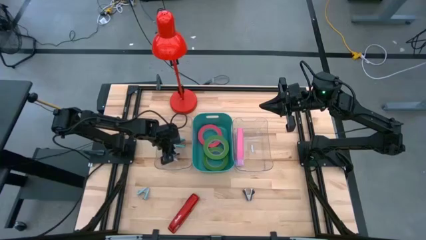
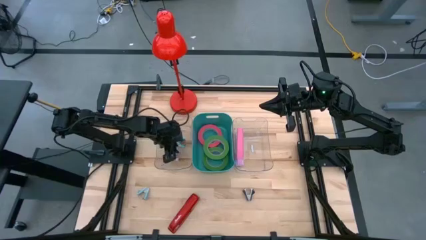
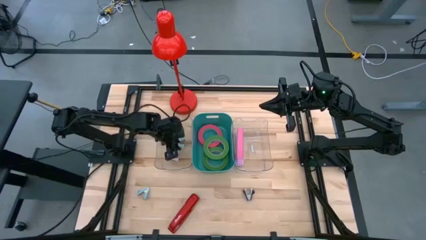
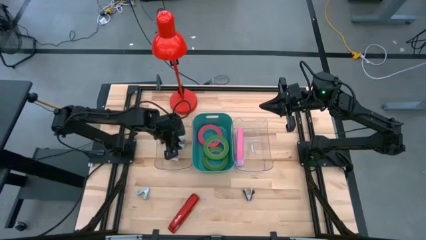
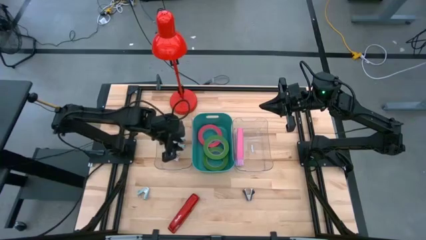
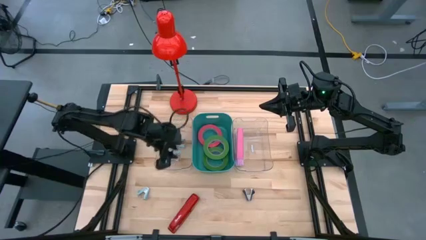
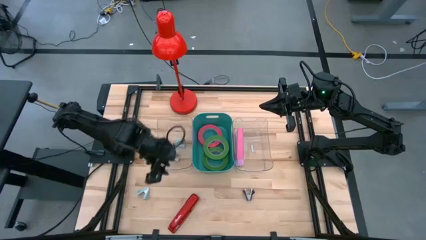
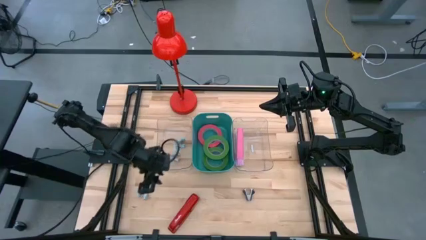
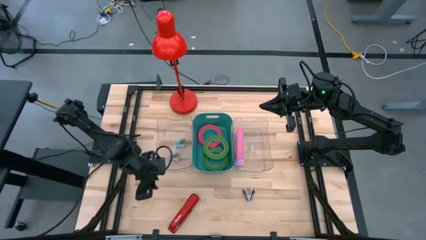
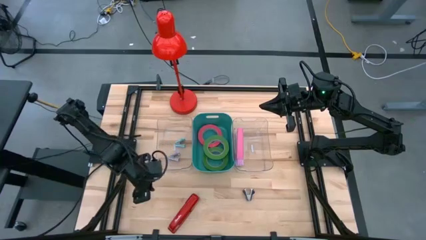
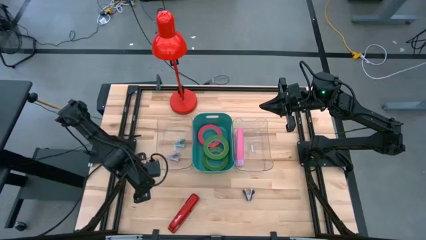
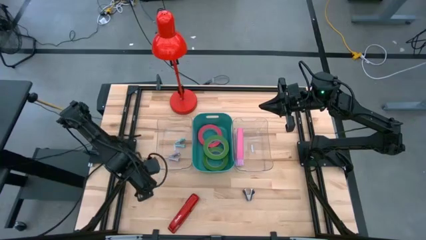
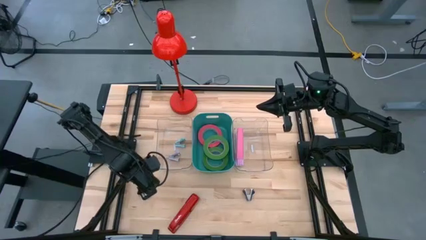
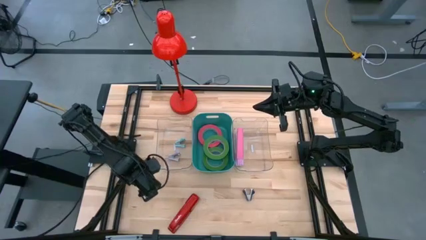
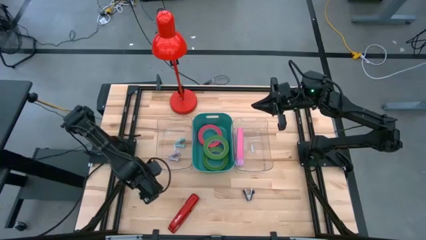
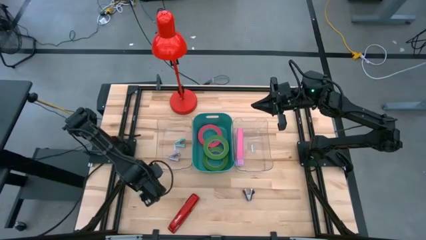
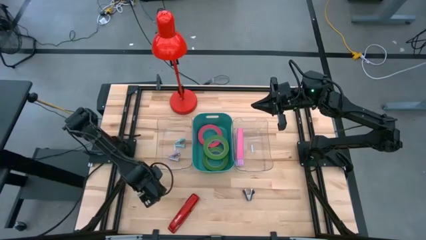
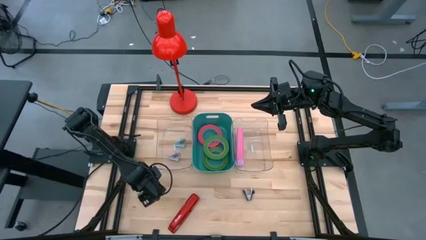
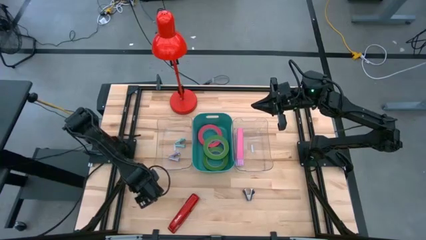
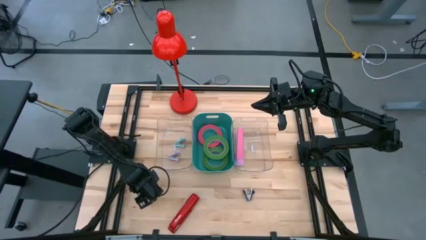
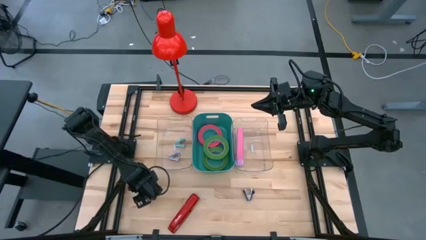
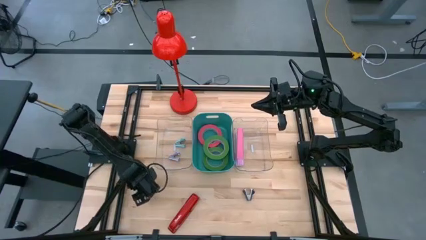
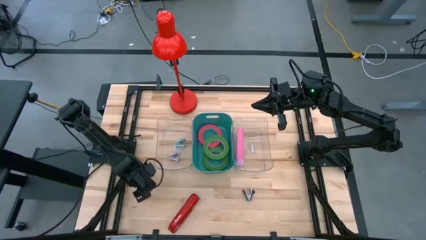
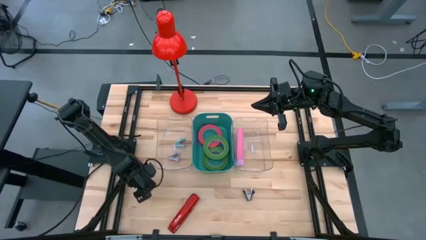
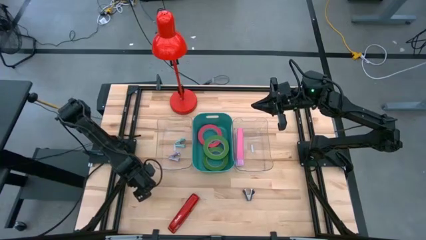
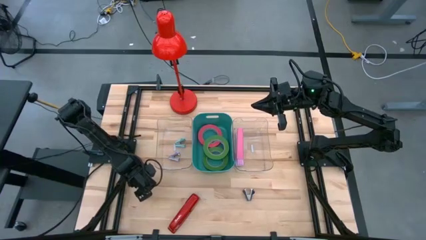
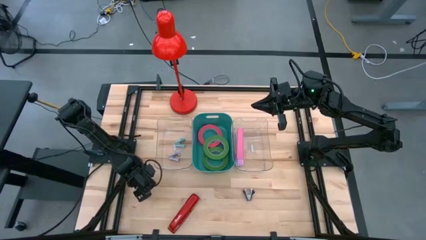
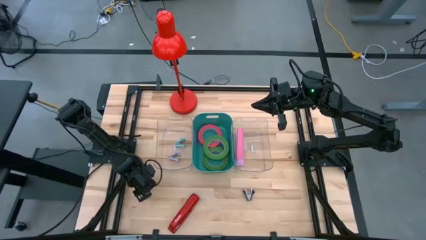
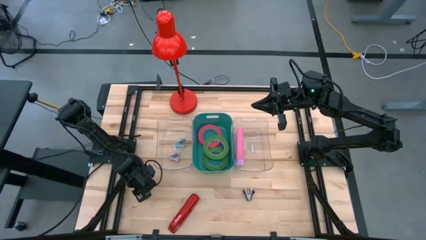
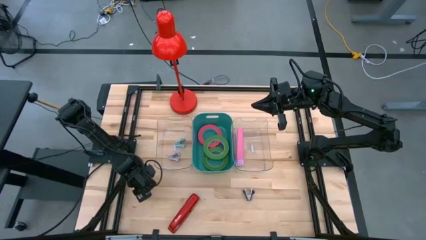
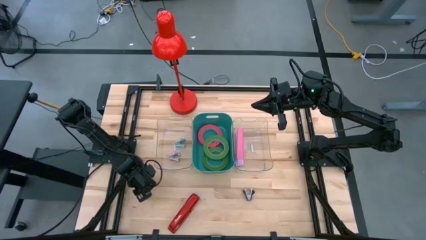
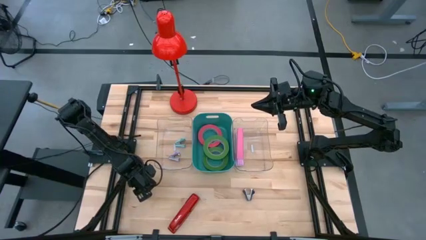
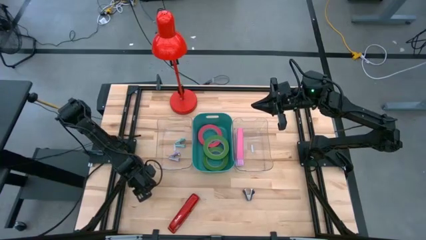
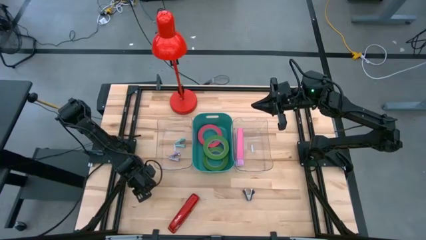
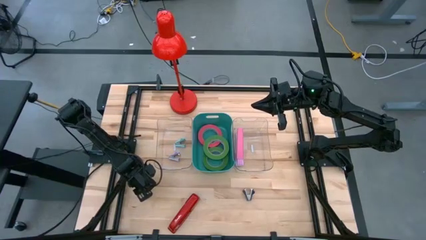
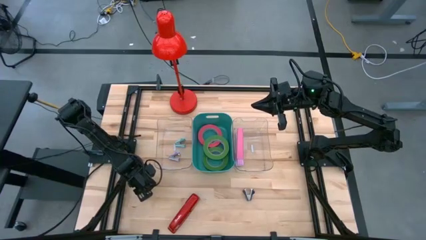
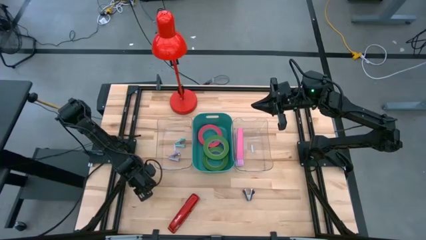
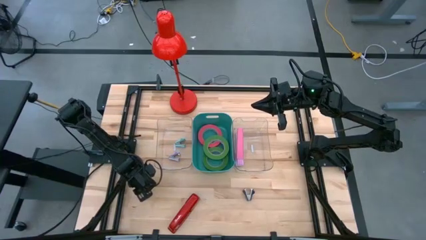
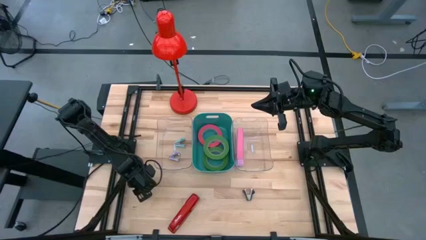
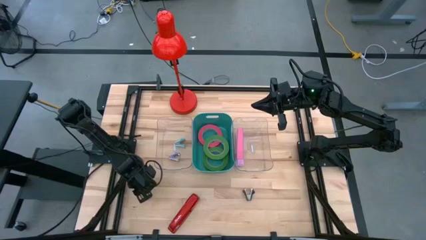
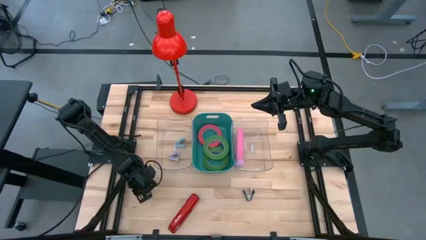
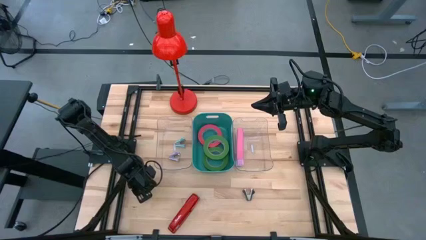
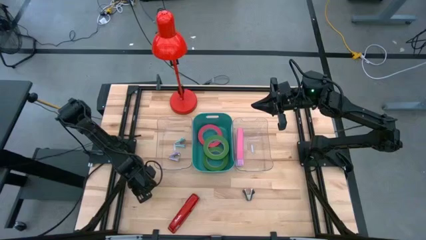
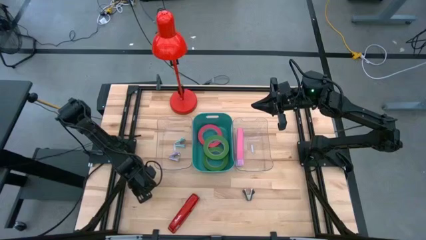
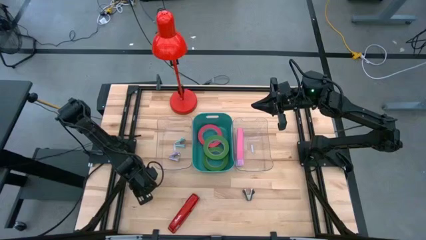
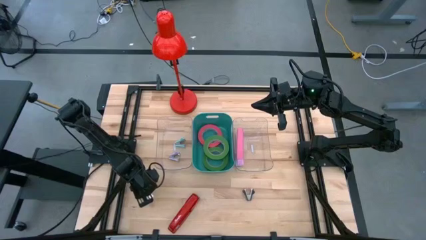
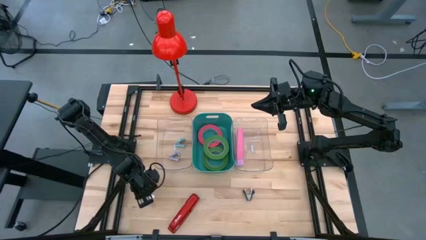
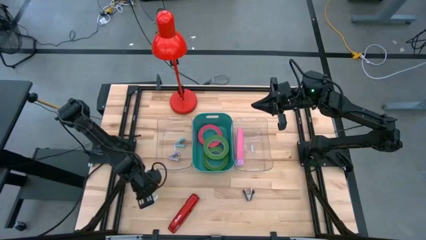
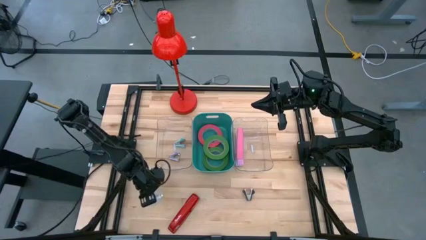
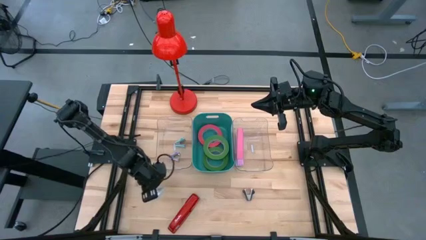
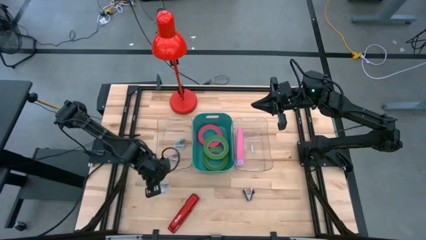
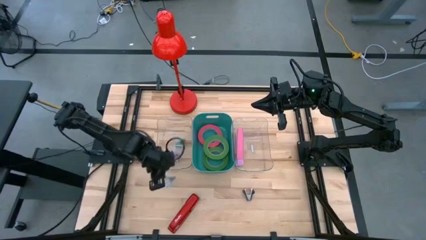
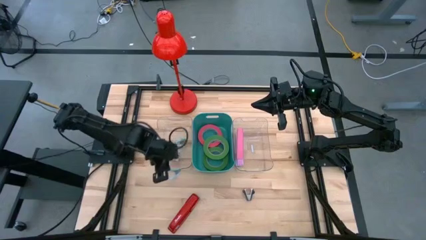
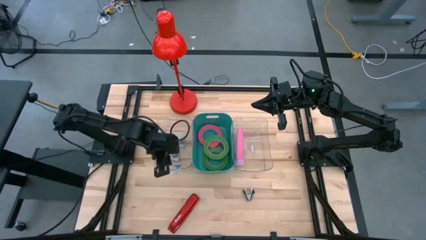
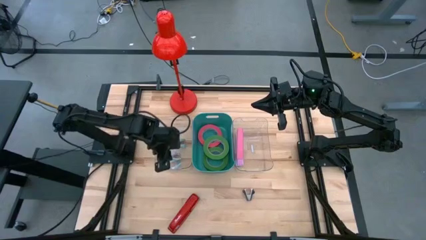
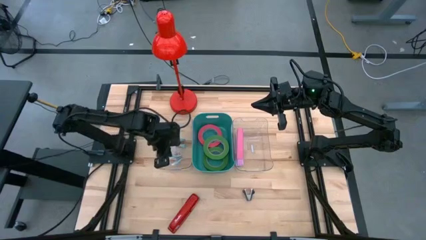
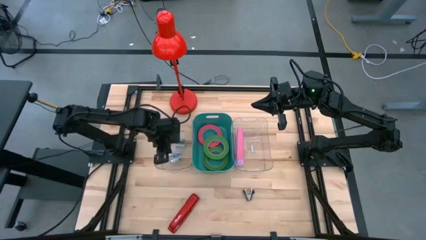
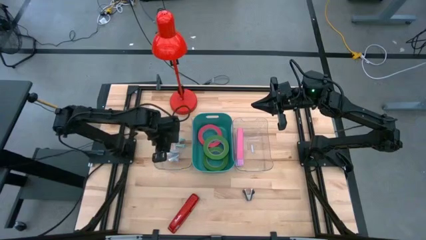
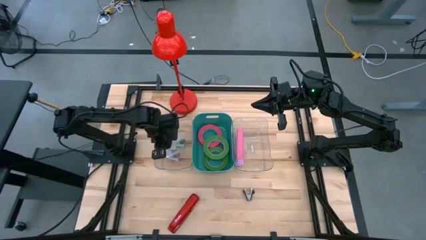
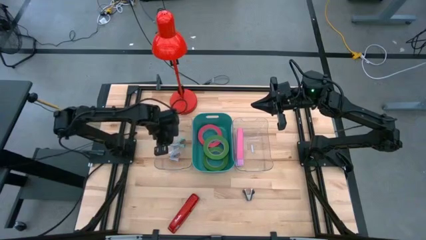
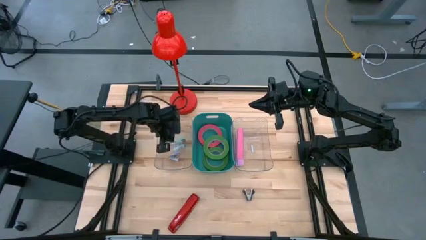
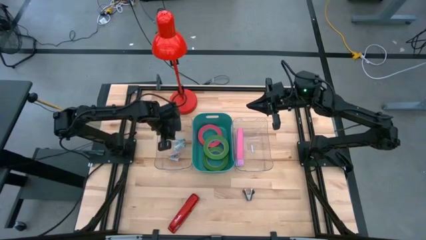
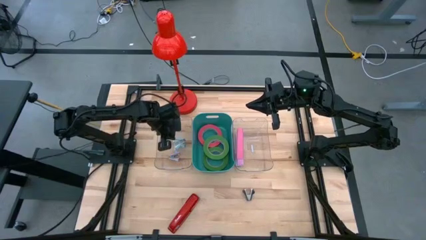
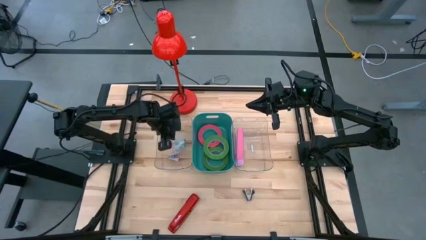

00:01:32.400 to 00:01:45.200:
Task: Pick and place Stapler, Stapler remover, tape
Put the light blue stapler remover into the left transparent bin
